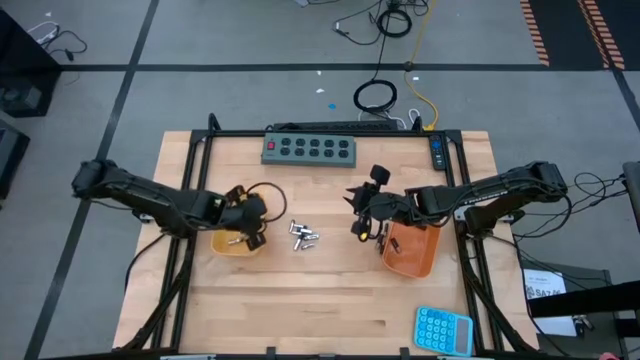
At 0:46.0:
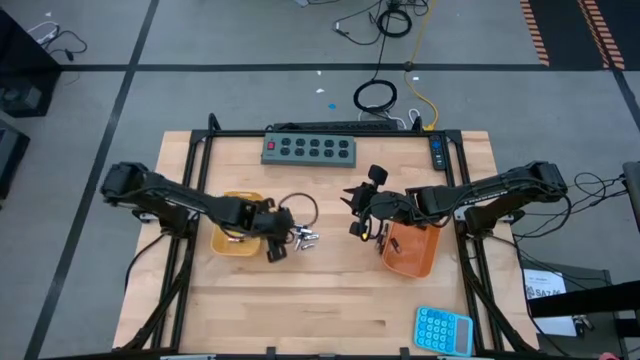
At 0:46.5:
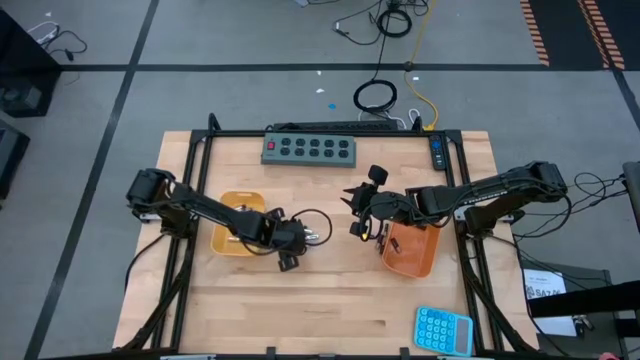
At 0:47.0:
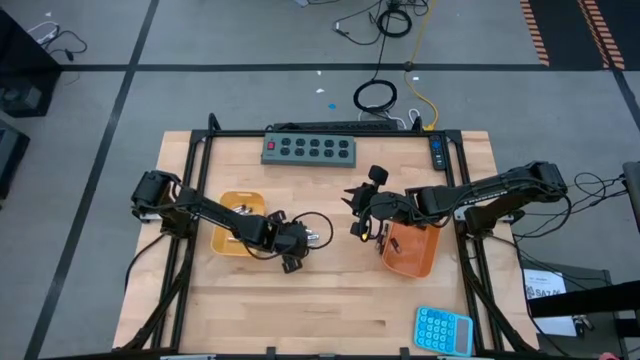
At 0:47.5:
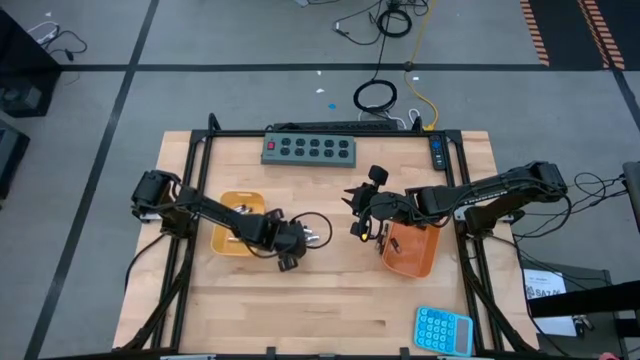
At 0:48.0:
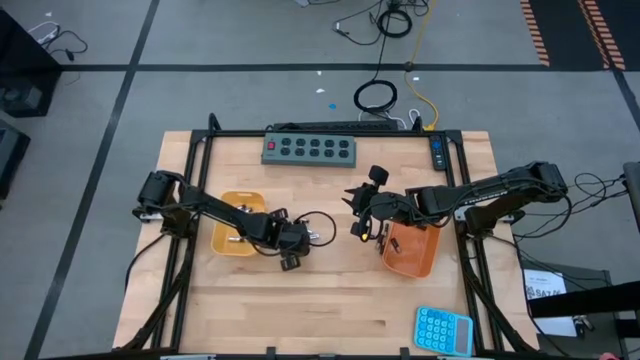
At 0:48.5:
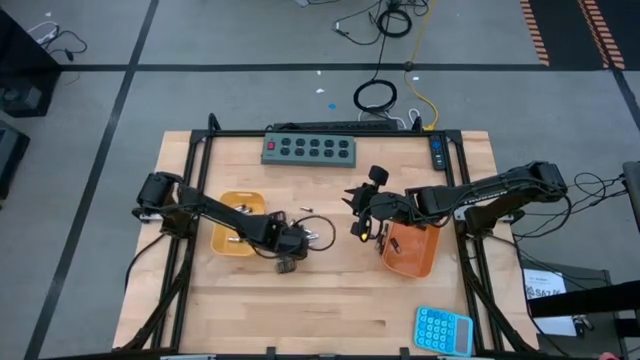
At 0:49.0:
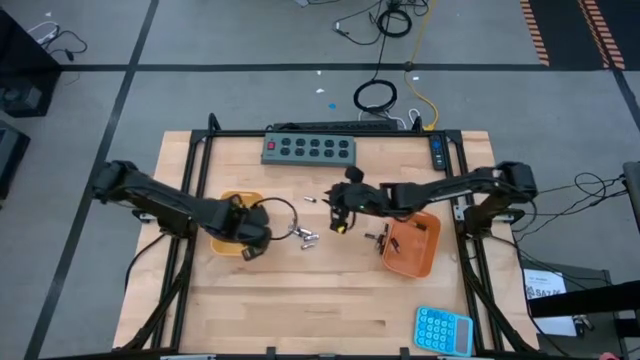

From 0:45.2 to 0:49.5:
Task: Sort batteries
Put the silver battery into the yellow bin

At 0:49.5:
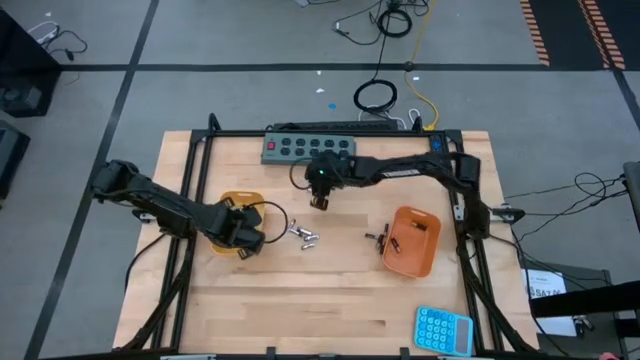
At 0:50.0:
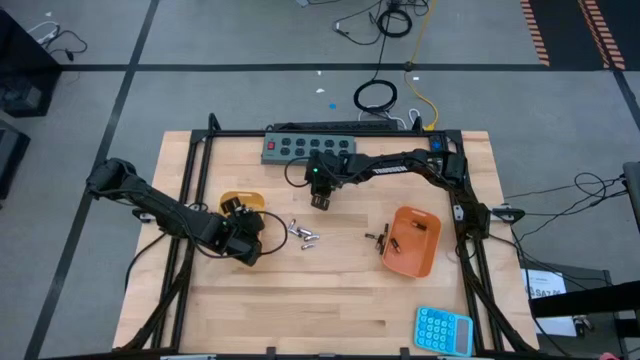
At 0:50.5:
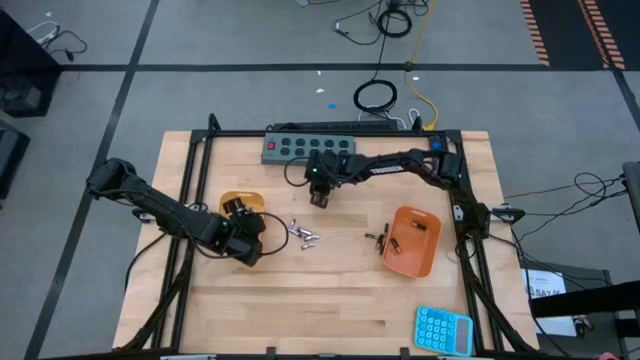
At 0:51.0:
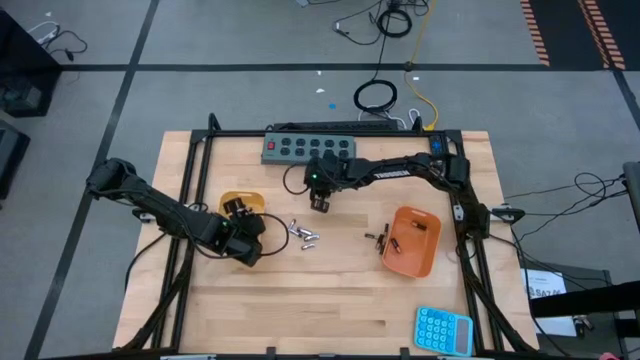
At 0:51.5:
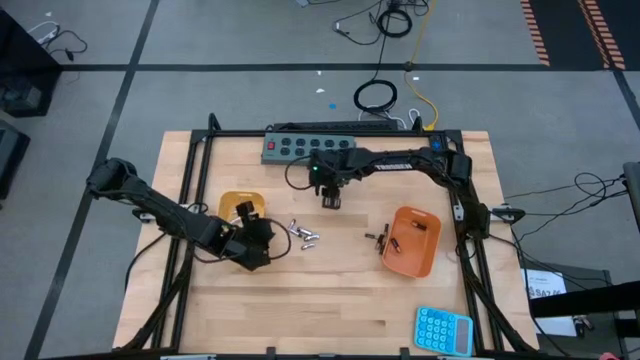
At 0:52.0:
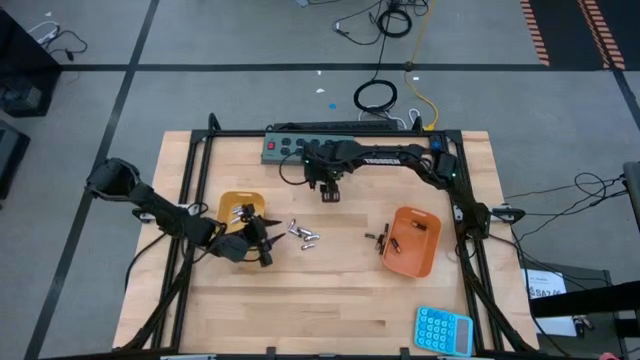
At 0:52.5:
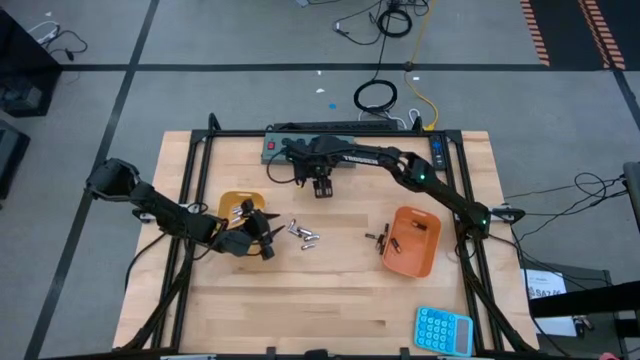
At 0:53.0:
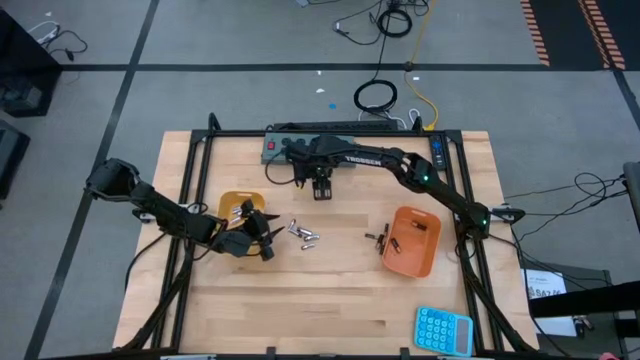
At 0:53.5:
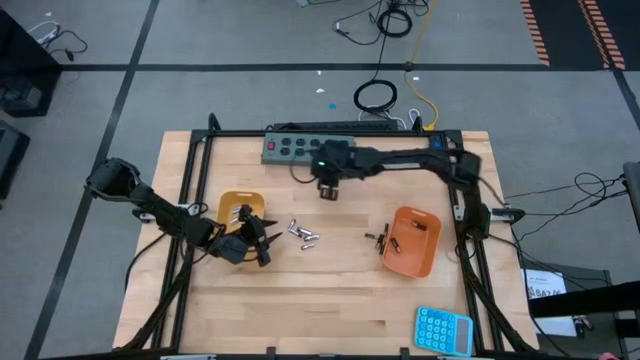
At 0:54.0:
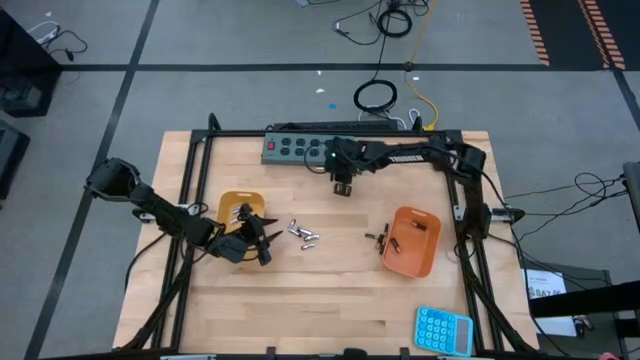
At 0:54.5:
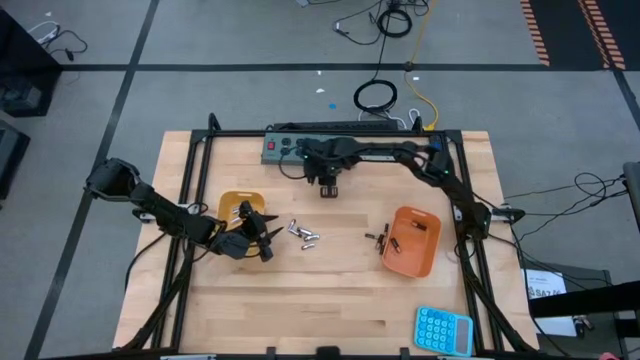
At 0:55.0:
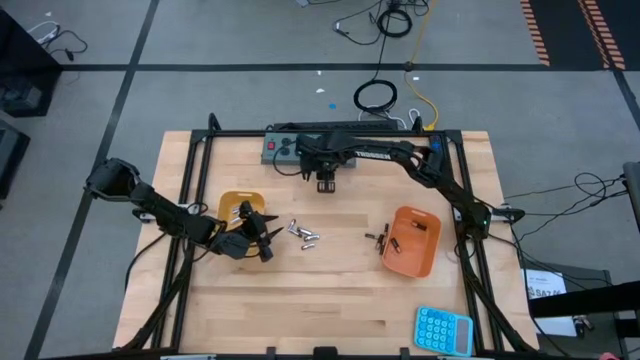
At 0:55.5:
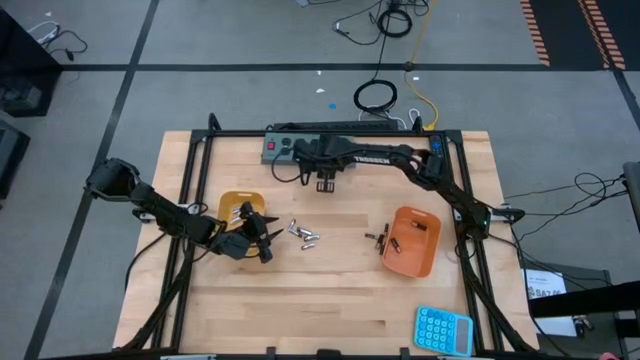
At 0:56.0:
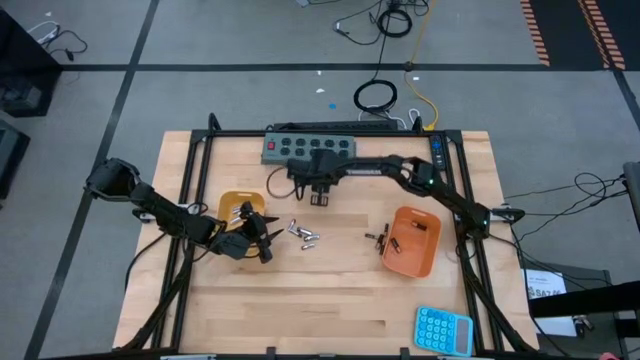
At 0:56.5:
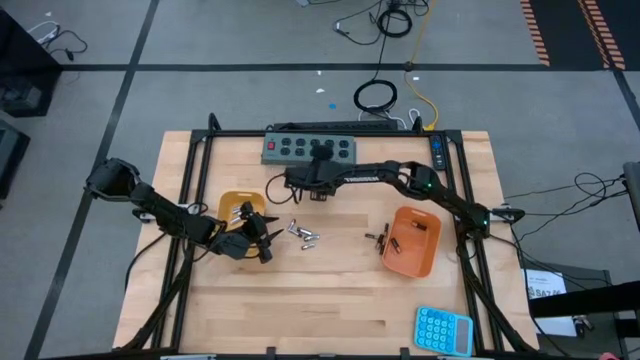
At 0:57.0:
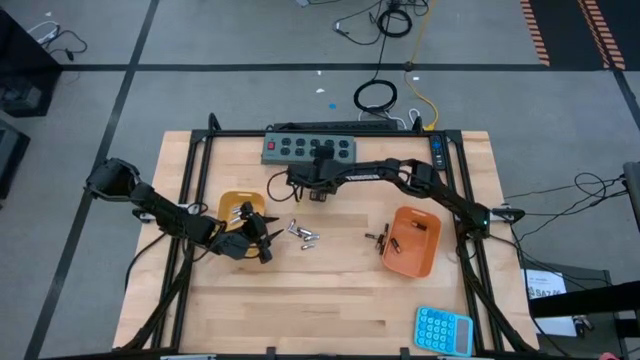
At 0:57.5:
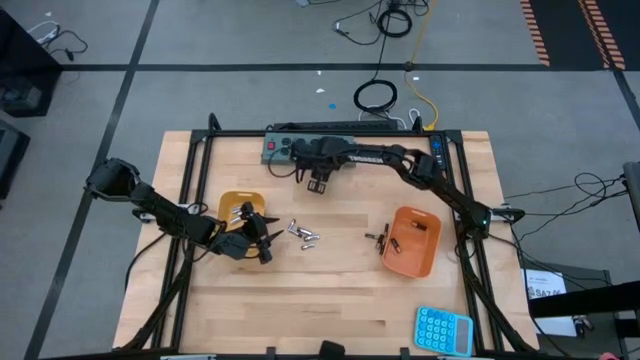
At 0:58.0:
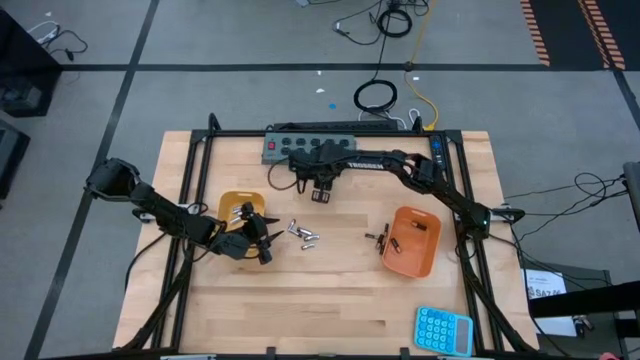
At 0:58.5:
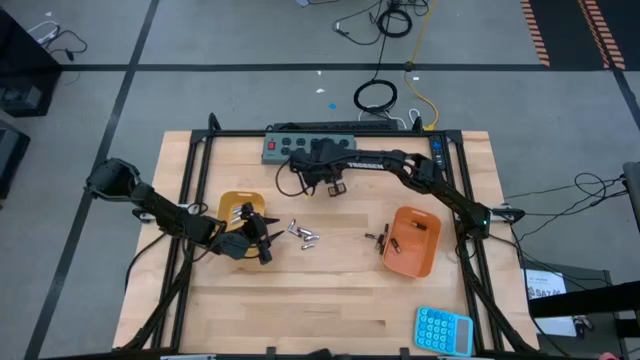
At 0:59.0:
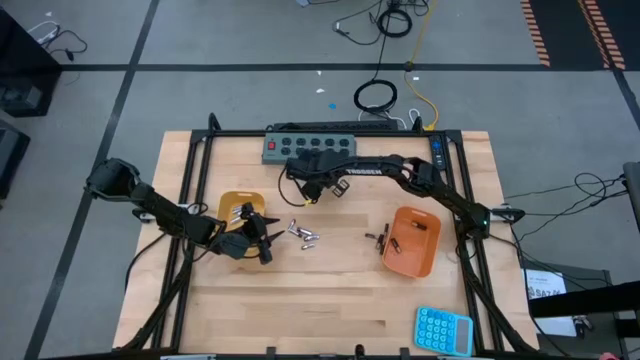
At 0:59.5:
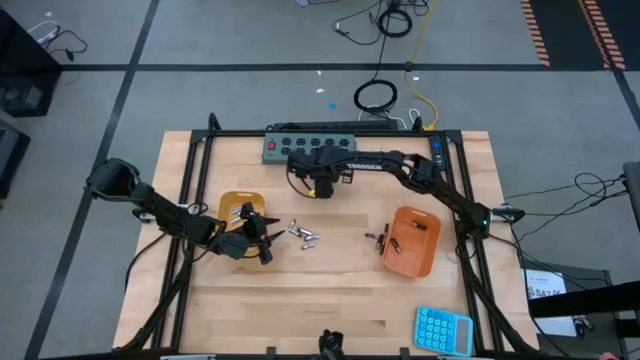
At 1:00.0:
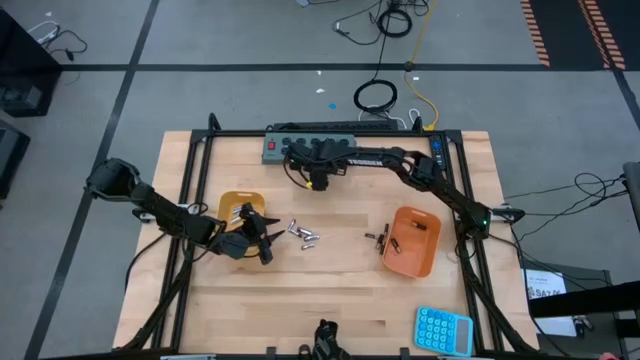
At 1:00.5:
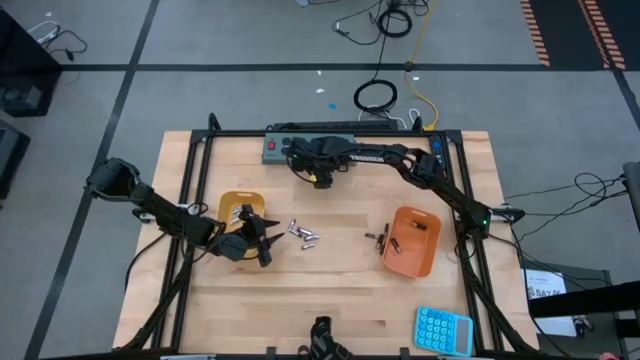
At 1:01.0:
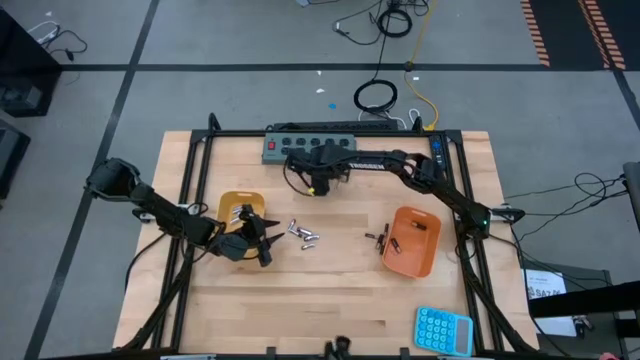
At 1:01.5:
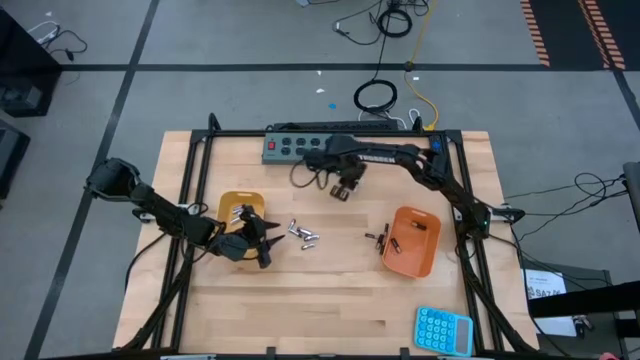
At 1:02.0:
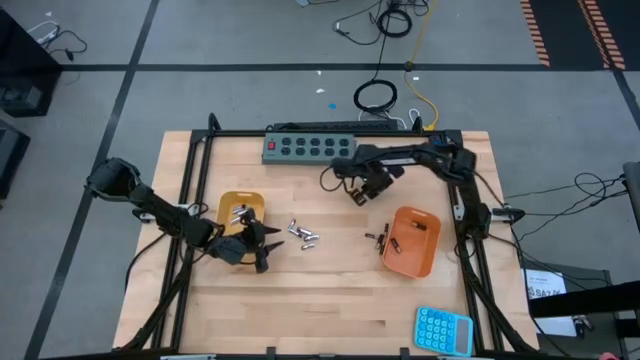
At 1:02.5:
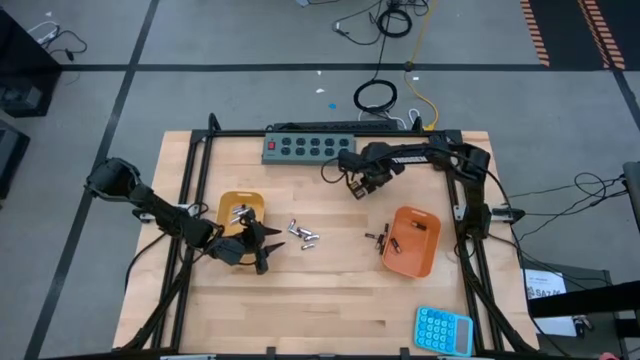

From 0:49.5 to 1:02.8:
Put the silver battery into the yellow bin

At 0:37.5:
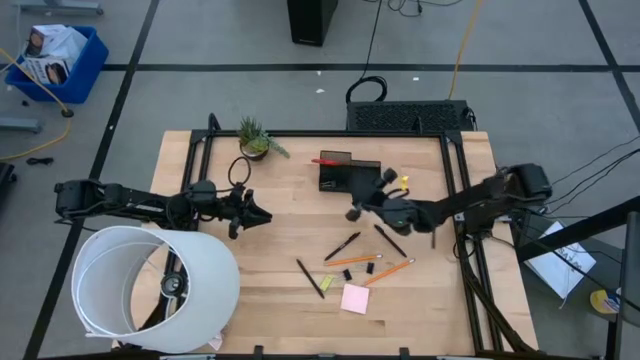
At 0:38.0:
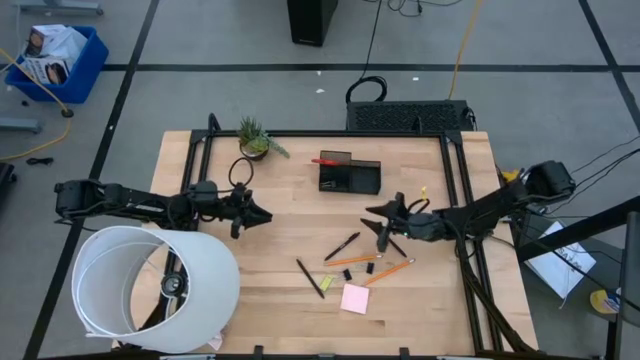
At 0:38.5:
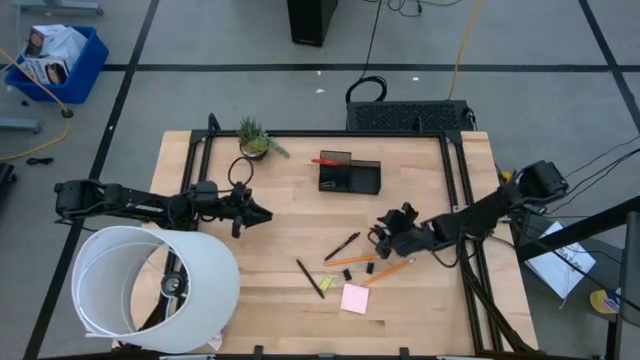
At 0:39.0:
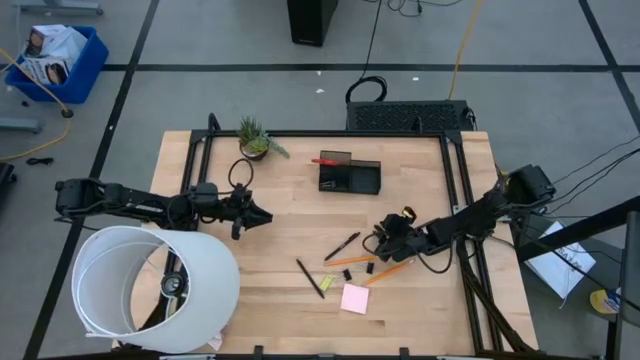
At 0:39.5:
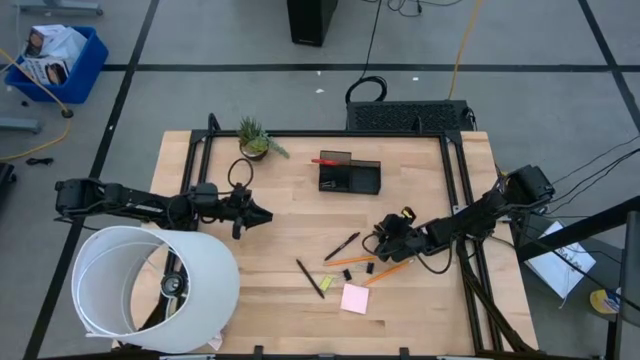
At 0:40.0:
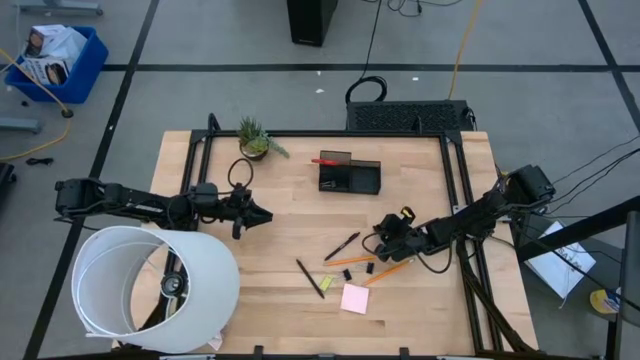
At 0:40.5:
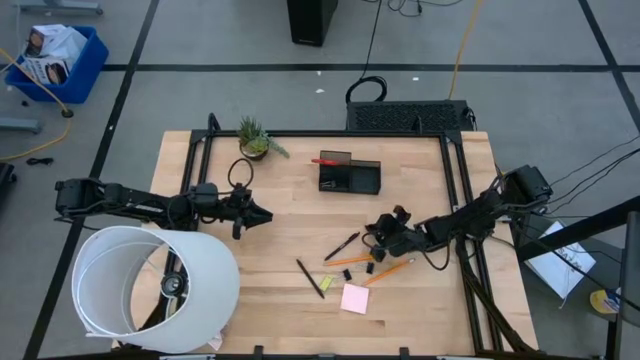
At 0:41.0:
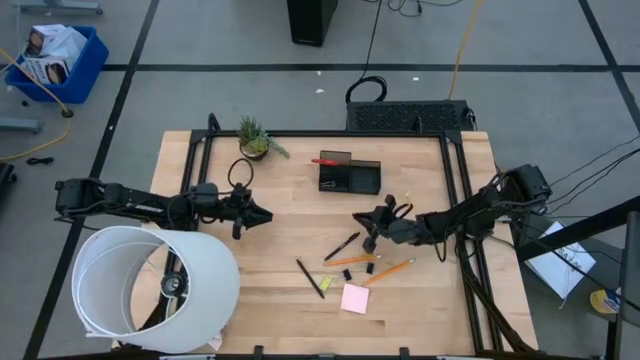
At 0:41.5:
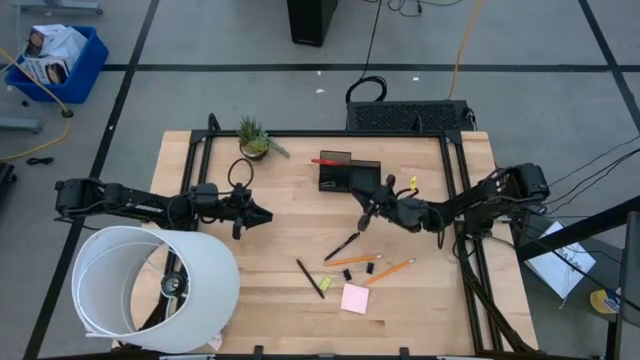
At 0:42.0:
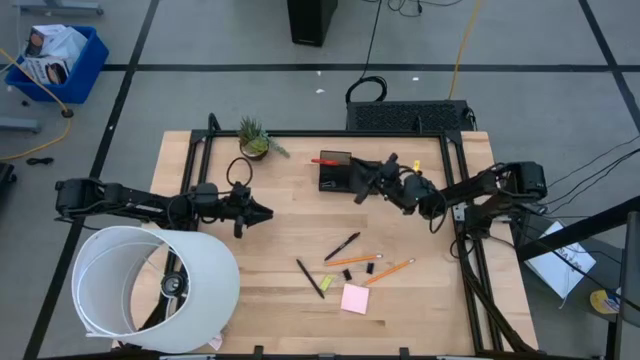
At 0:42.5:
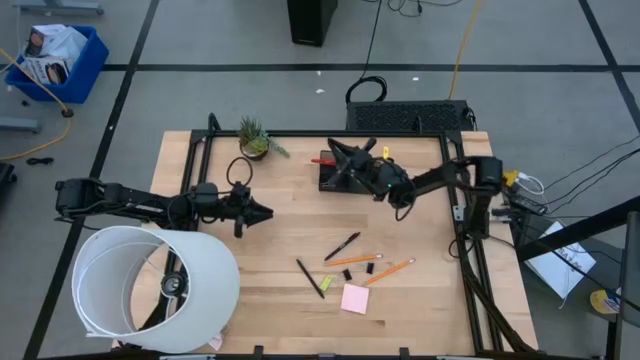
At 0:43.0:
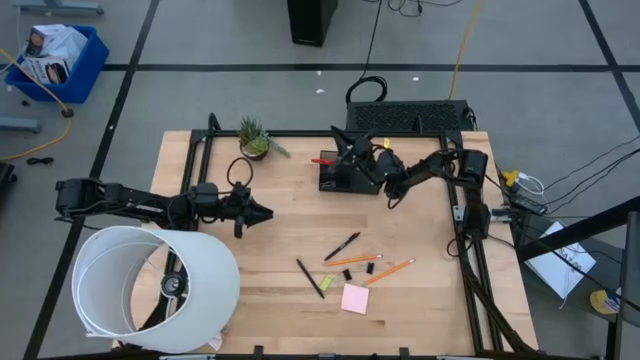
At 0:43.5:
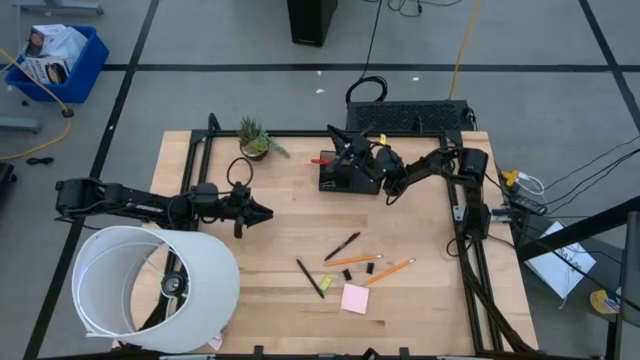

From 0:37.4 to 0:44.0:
Task: Pick and place office supplies into organizer
Put the black pen into the desk organizer
